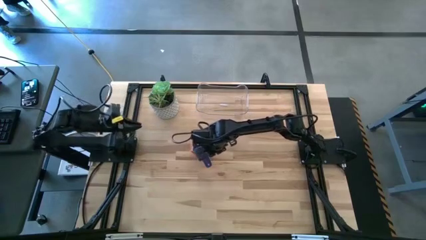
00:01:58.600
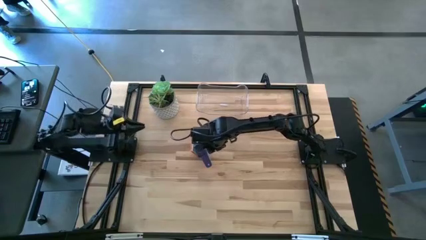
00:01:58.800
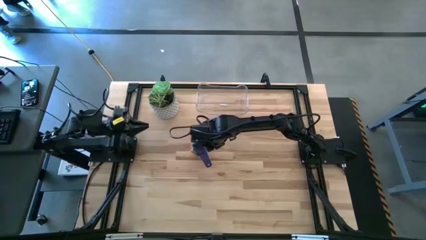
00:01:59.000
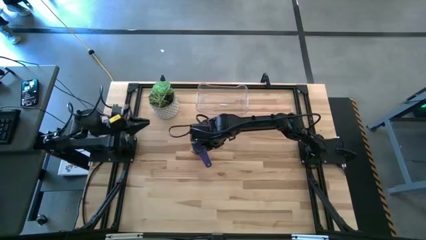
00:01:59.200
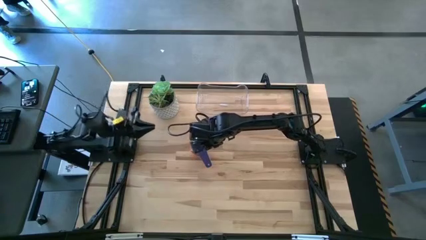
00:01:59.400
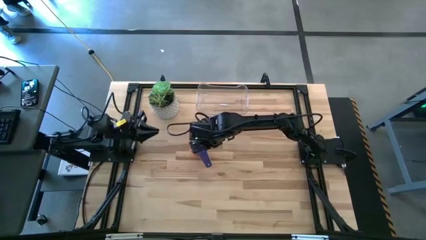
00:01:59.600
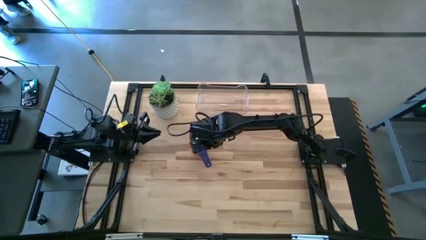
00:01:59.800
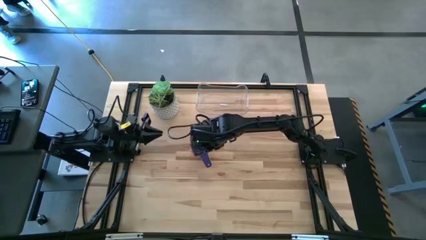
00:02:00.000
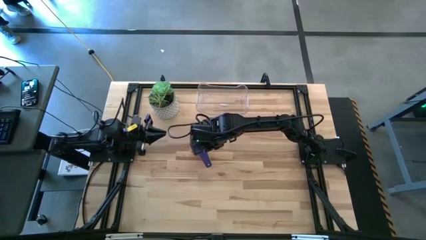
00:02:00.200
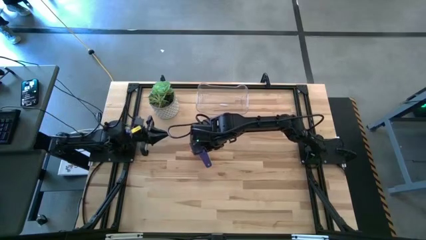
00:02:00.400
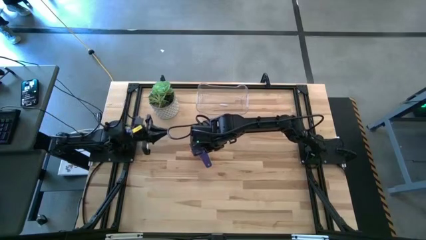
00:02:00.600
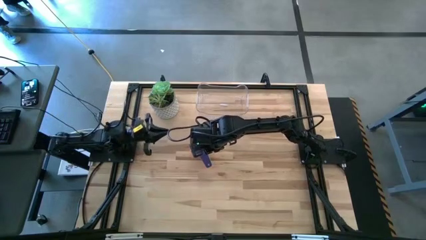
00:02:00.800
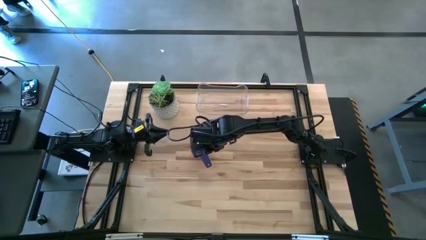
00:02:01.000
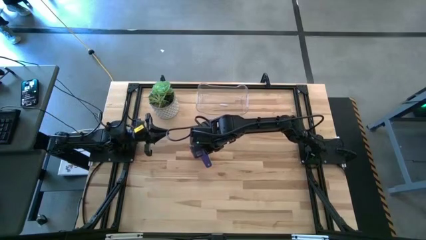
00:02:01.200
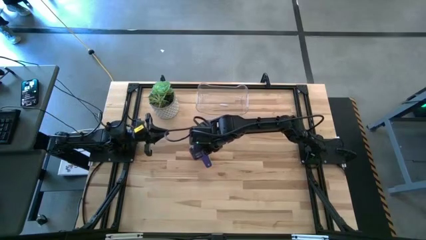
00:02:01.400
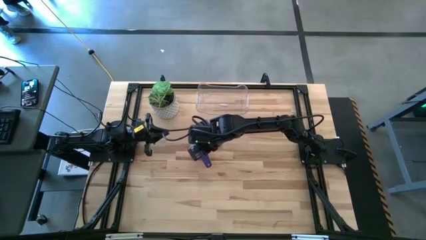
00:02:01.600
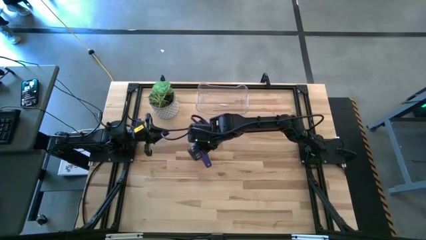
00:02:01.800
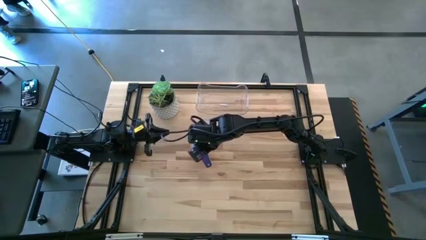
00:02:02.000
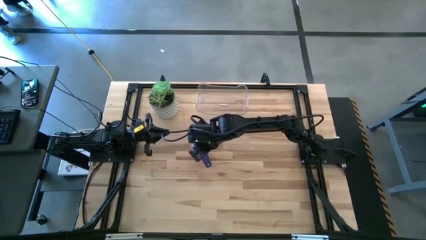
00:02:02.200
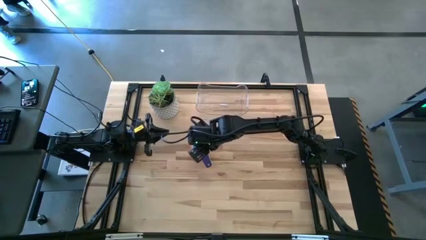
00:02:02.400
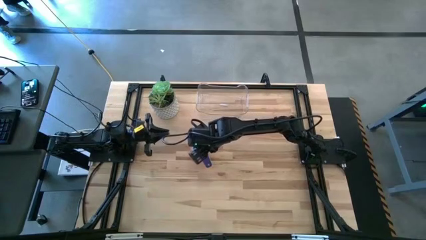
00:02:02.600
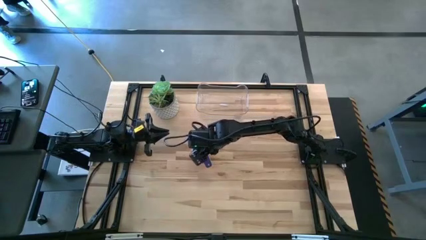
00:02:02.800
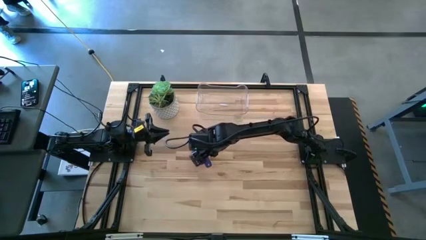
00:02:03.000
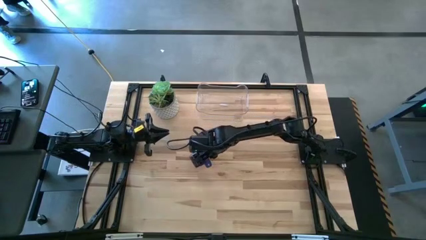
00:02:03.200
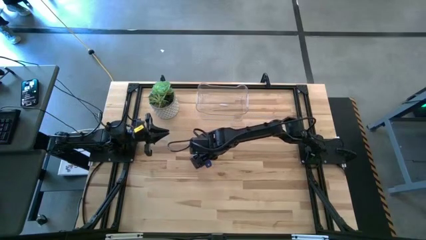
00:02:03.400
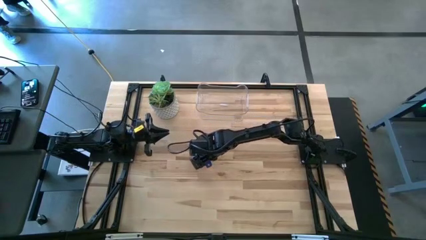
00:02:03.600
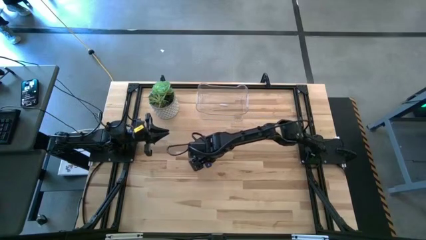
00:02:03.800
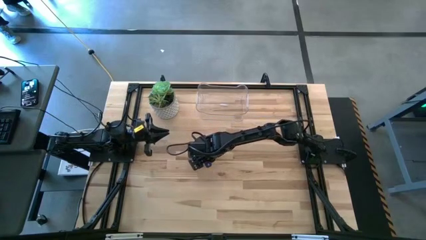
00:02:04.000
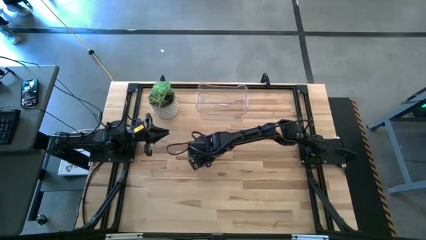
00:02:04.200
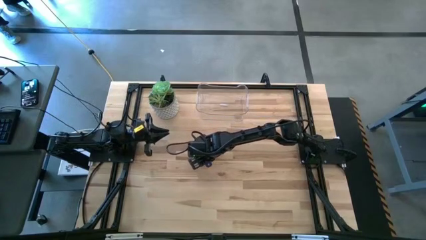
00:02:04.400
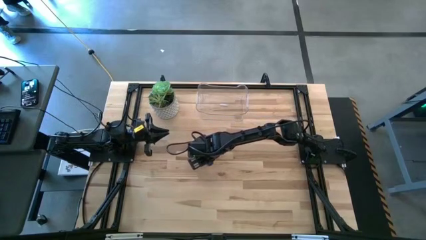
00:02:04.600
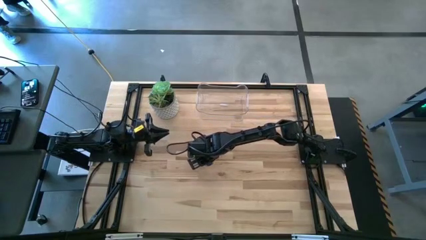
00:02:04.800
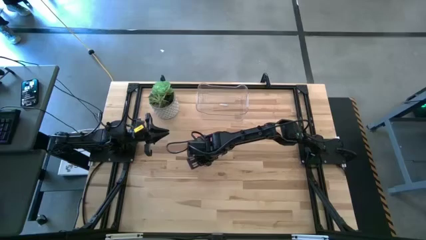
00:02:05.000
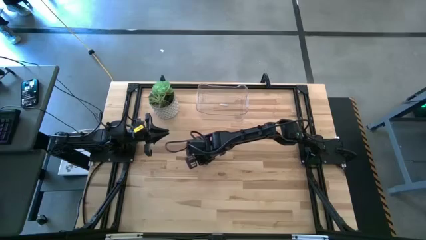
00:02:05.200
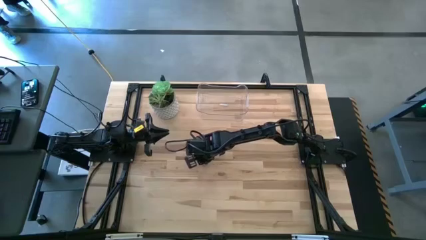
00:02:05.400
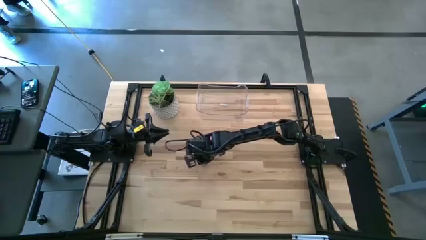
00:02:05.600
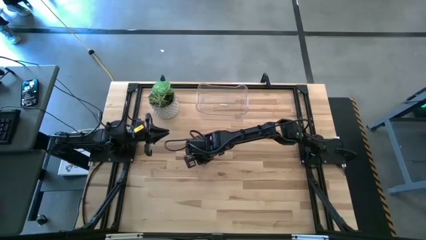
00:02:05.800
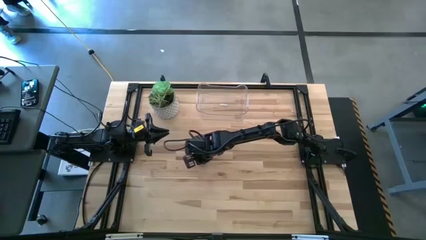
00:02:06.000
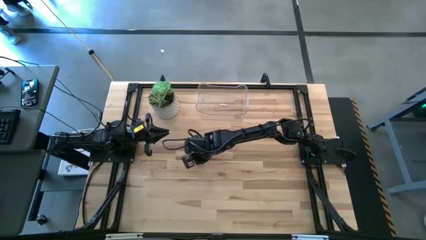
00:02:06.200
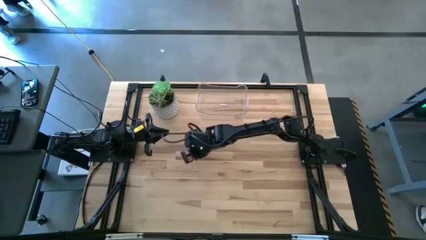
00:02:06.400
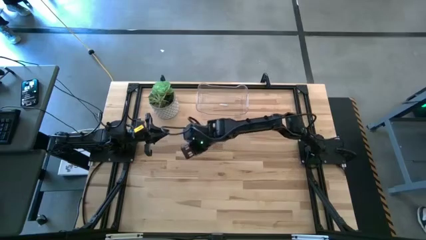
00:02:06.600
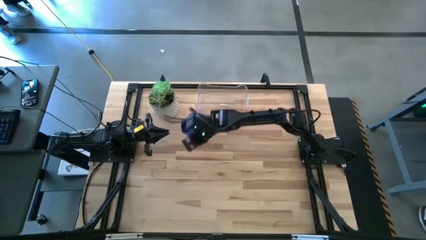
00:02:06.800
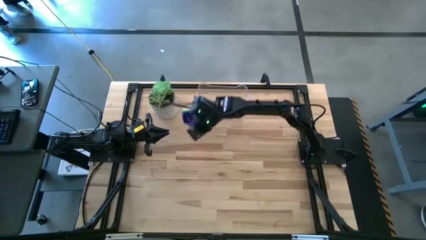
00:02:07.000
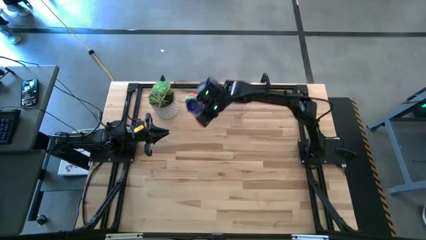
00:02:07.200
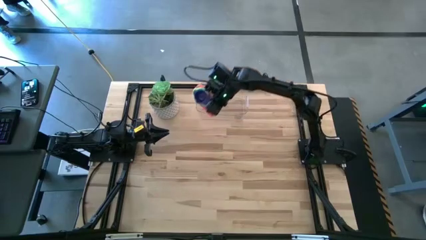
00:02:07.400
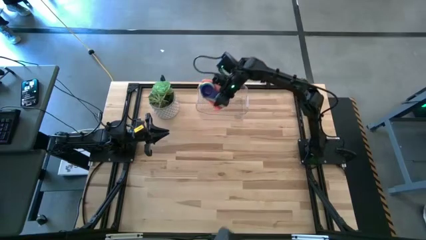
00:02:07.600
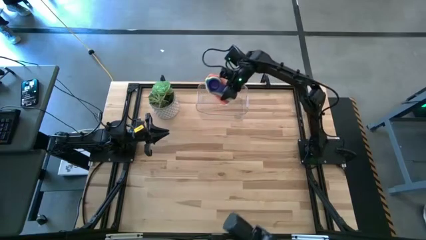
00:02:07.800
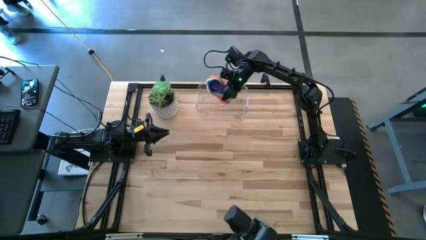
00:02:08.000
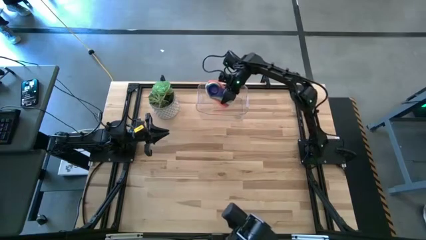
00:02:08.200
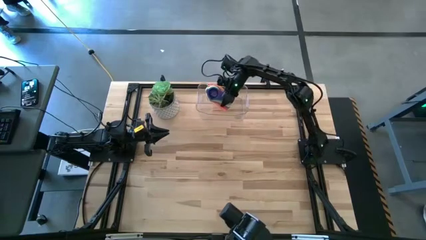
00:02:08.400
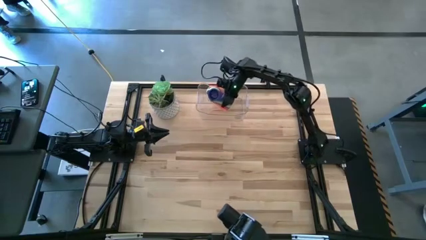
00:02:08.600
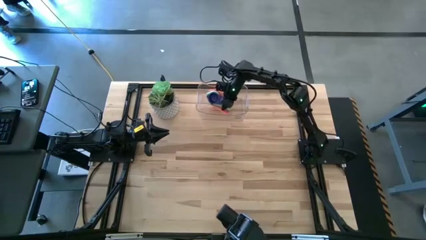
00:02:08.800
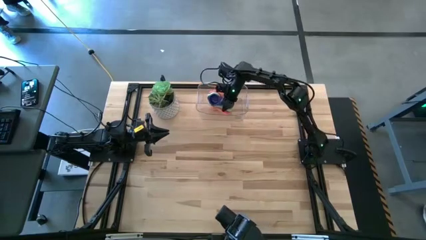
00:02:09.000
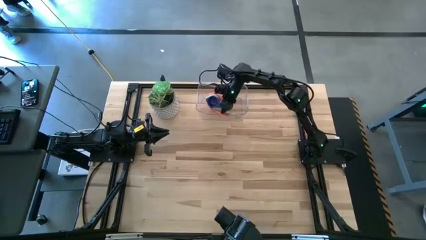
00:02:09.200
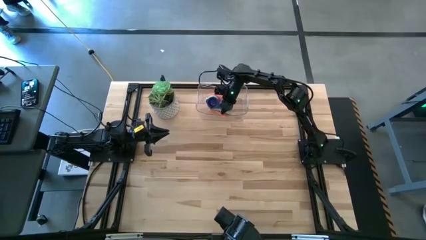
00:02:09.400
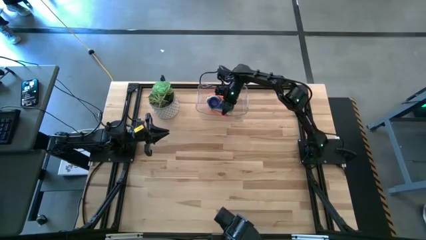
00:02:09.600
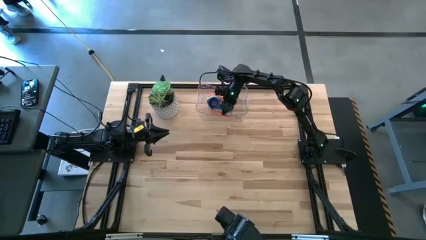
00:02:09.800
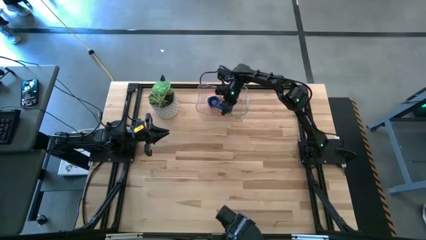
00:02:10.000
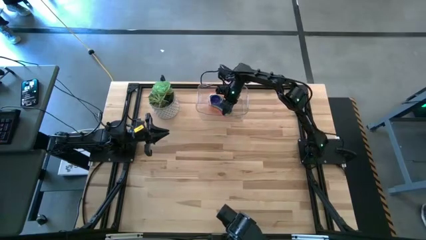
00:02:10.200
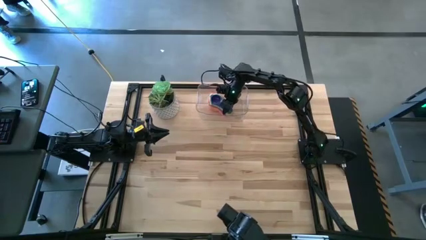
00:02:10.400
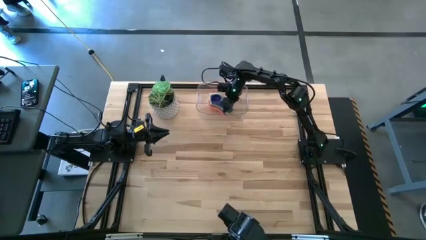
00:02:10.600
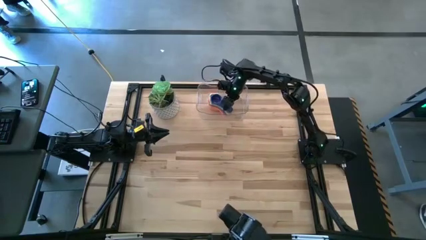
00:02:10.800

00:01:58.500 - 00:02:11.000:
Task: Nest measuring cups in basket
Put the nested measuring cups into the transparent bin

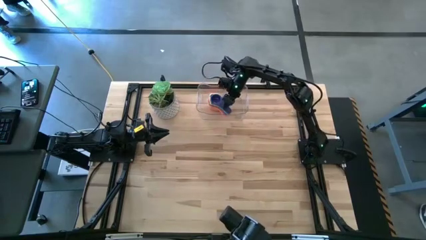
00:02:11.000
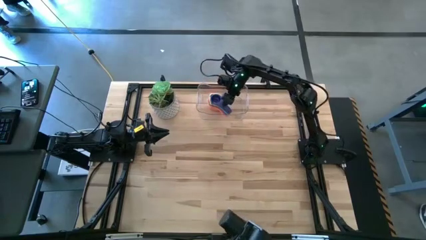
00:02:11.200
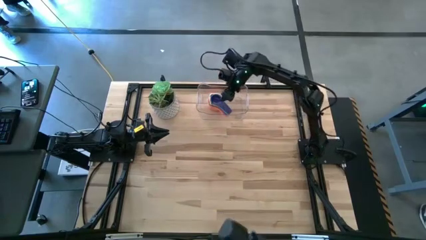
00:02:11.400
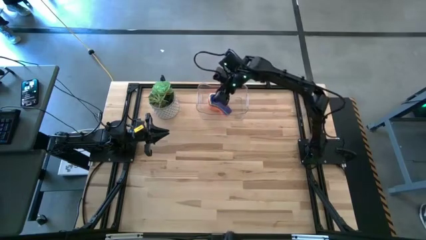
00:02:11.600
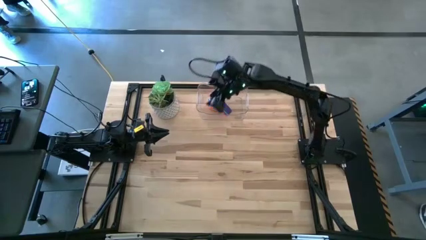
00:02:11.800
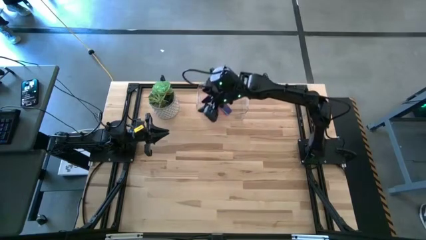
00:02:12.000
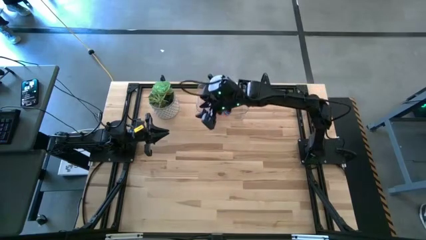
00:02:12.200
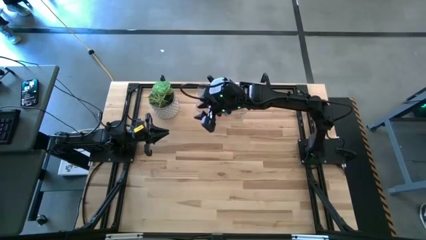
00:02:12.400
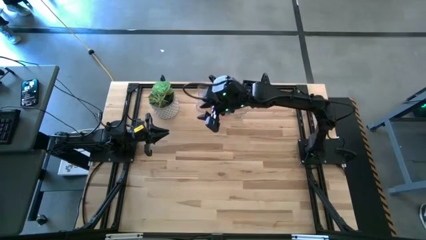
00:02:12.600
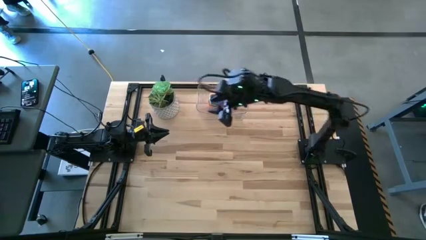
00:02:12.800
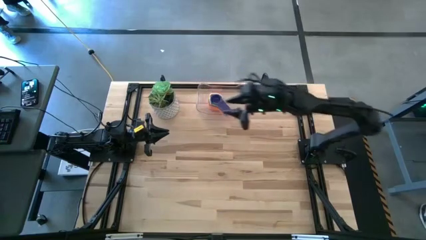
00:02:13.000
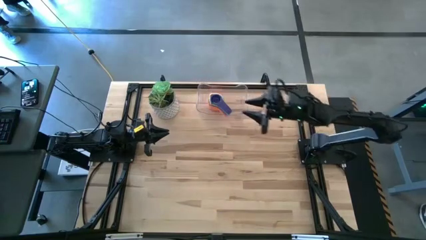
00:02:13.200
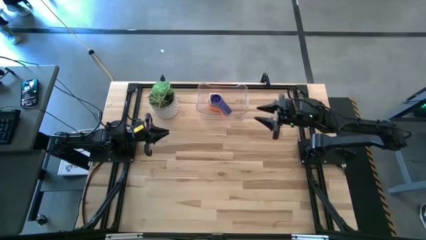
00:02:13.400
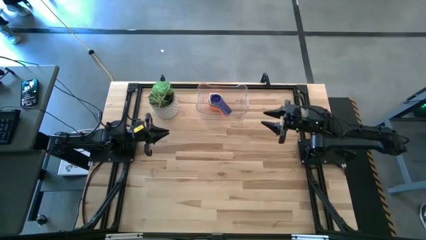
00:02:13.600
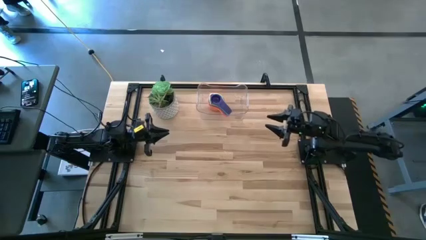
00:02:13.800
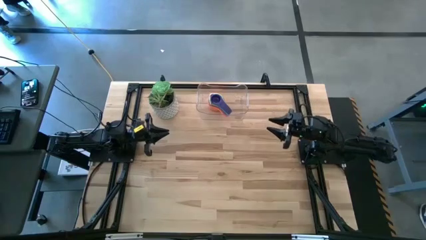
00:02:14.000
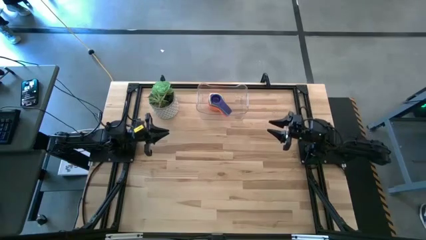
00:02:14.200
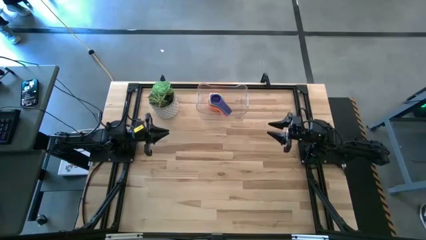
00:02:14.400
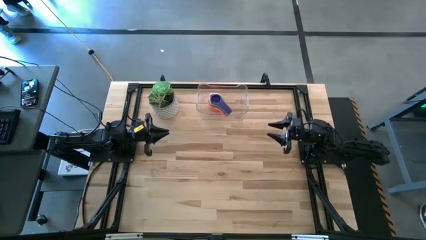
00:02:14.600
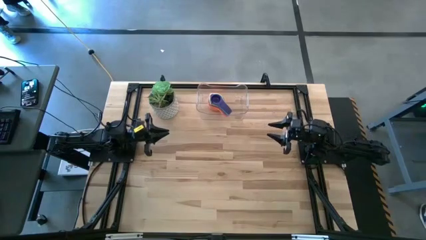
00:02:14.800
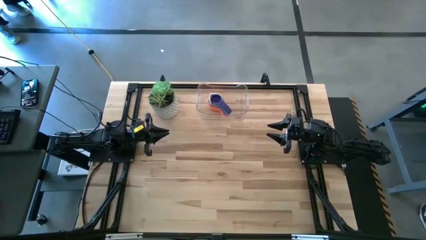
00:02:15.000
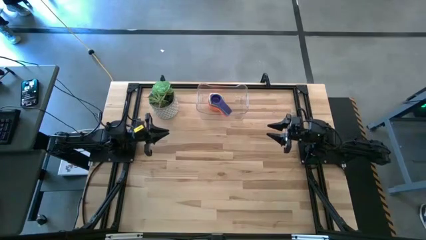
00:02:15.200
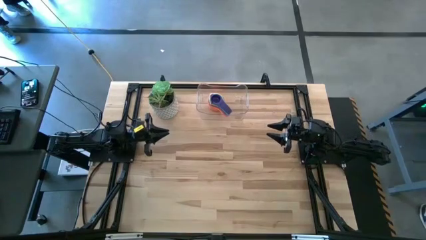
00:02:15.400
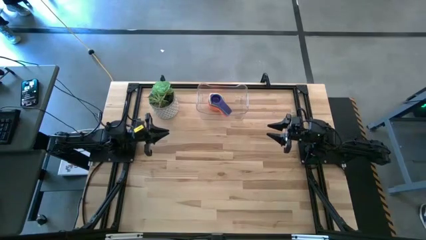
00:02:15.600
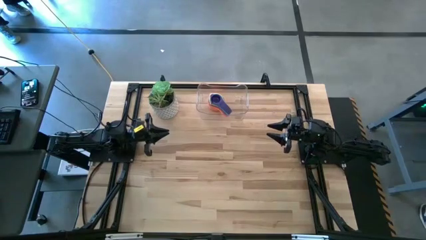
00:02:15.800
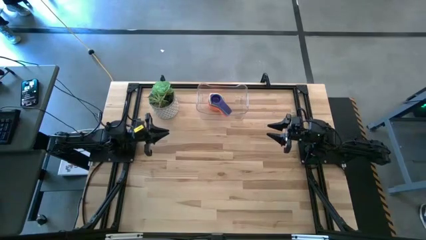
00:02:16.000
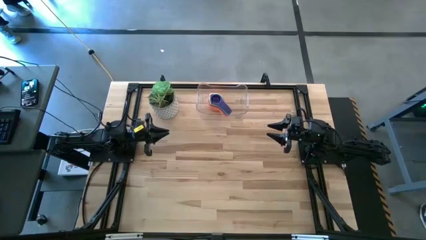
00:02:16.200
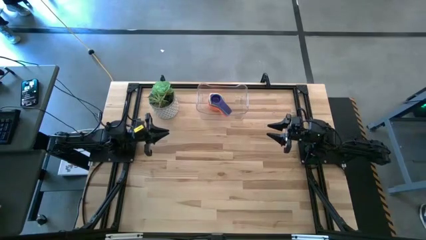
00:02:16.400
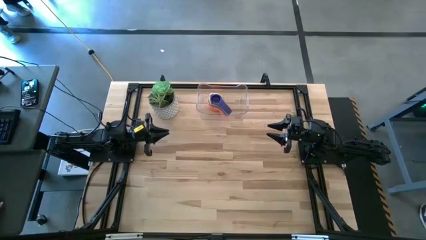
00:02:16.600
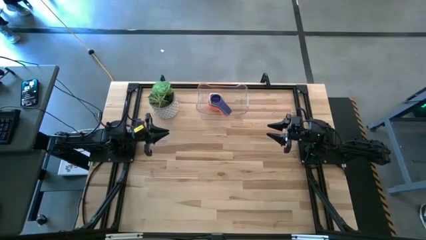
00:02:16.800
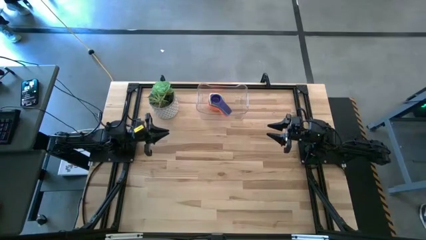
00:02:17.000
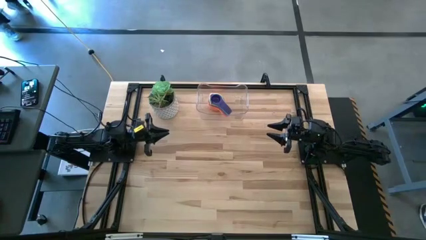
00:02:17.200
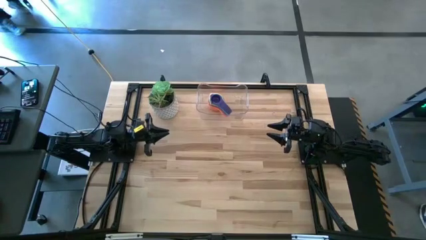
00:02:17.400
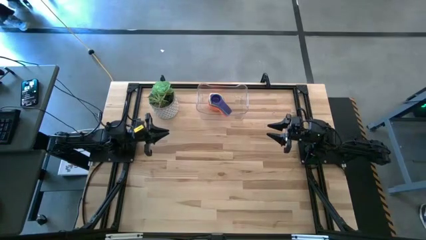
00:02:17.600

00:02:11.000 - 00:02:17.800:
Return to Home Position
